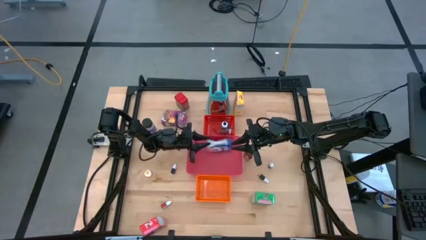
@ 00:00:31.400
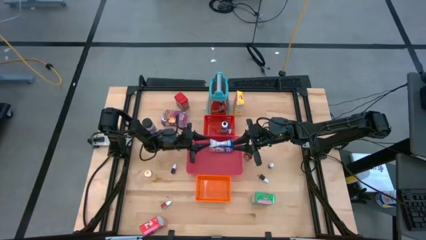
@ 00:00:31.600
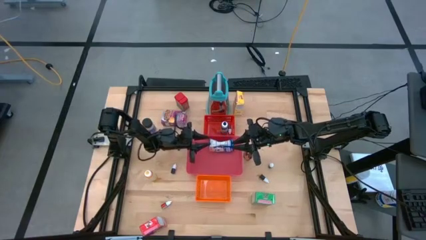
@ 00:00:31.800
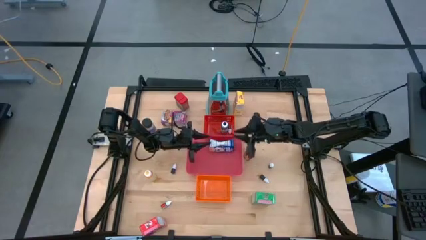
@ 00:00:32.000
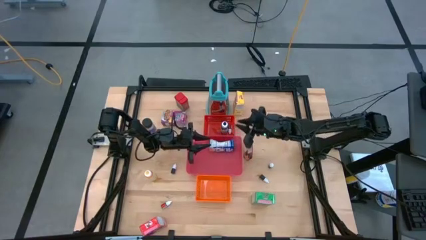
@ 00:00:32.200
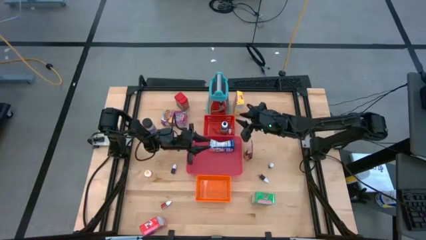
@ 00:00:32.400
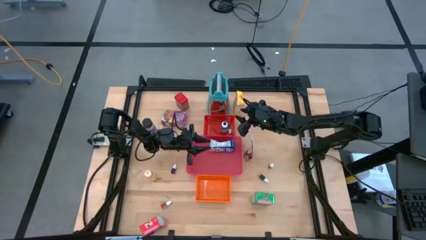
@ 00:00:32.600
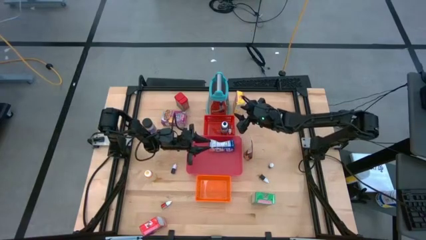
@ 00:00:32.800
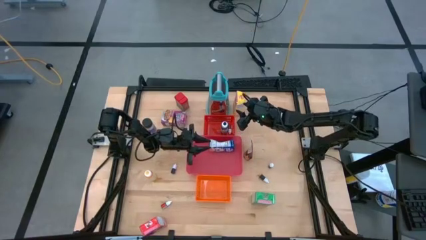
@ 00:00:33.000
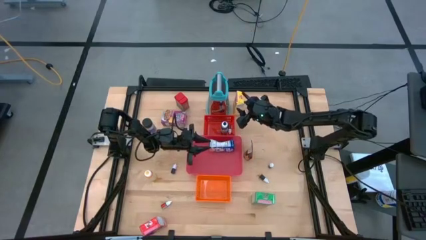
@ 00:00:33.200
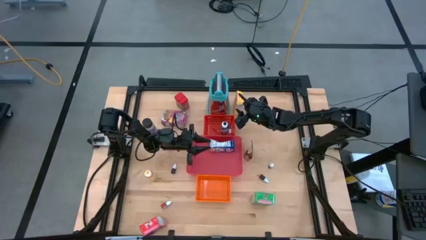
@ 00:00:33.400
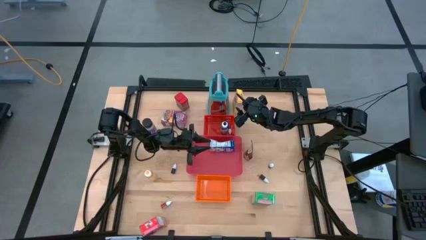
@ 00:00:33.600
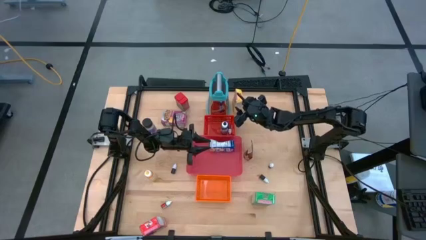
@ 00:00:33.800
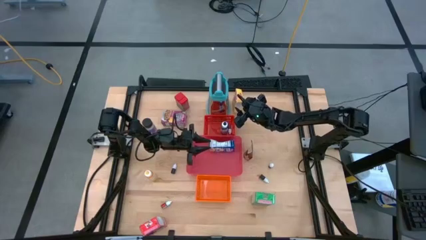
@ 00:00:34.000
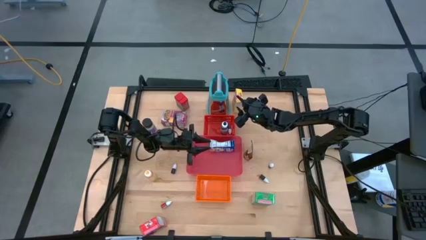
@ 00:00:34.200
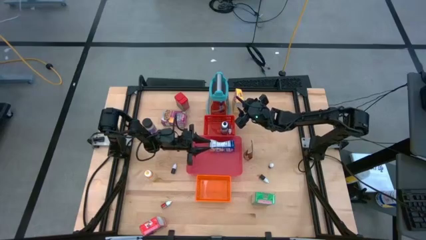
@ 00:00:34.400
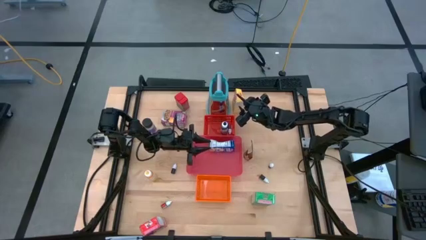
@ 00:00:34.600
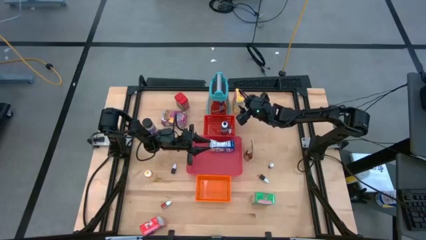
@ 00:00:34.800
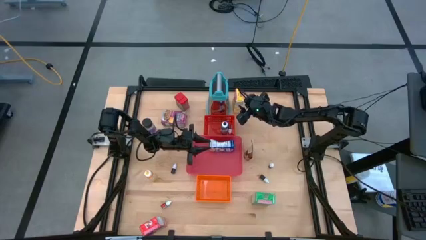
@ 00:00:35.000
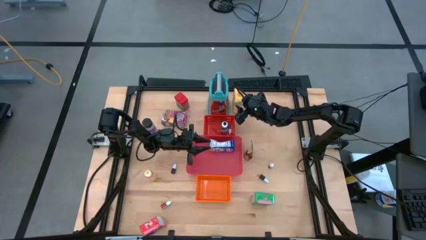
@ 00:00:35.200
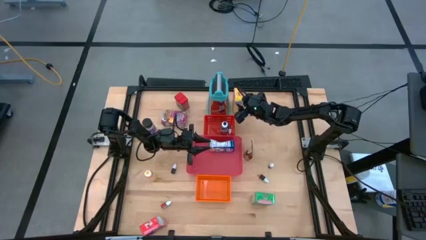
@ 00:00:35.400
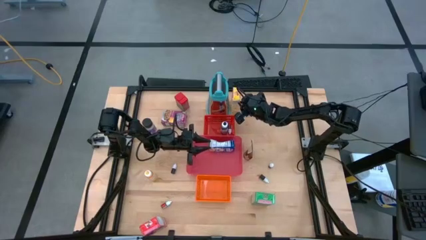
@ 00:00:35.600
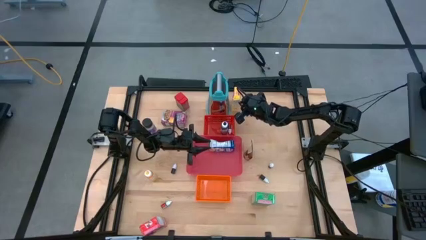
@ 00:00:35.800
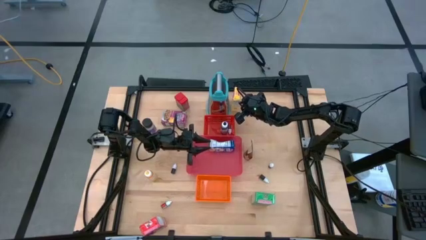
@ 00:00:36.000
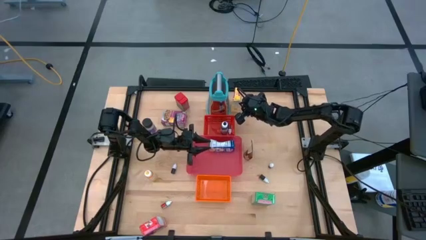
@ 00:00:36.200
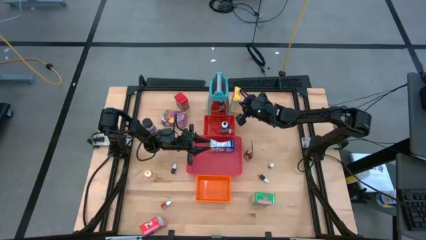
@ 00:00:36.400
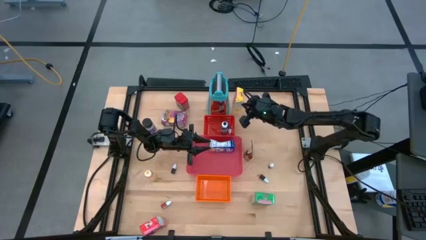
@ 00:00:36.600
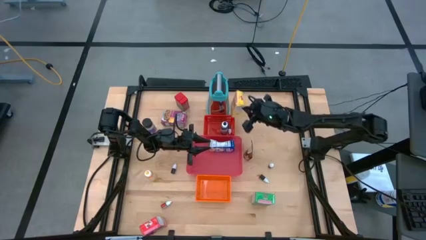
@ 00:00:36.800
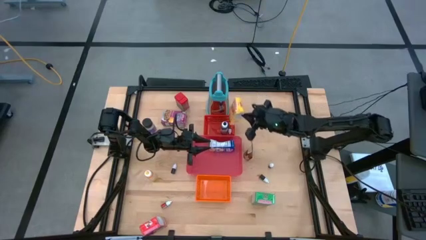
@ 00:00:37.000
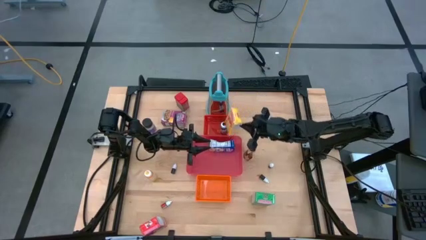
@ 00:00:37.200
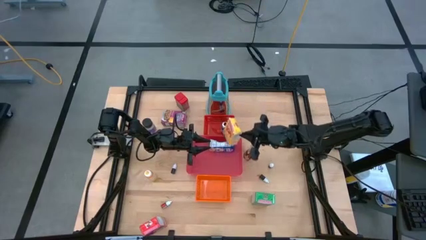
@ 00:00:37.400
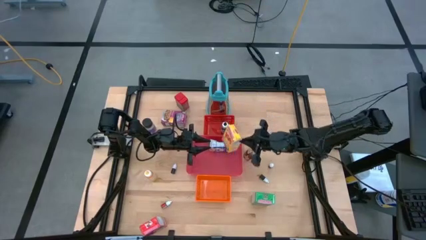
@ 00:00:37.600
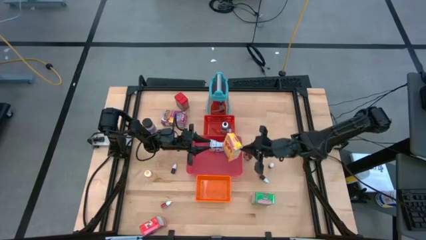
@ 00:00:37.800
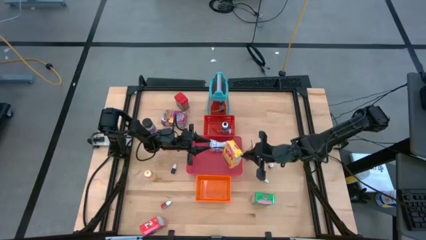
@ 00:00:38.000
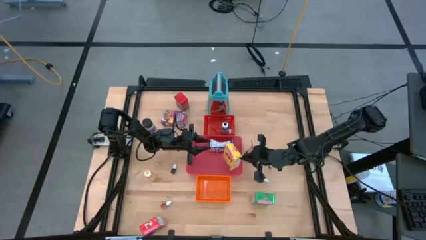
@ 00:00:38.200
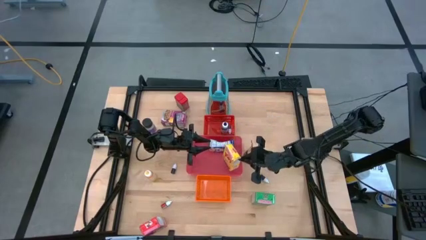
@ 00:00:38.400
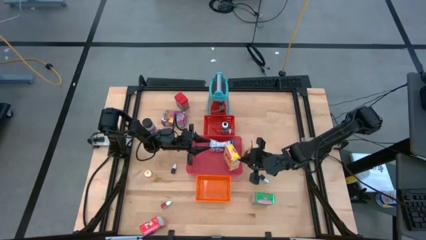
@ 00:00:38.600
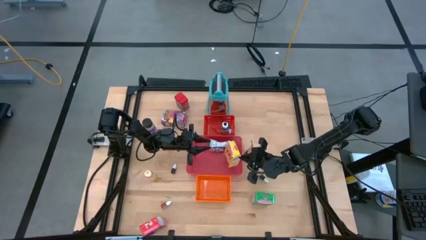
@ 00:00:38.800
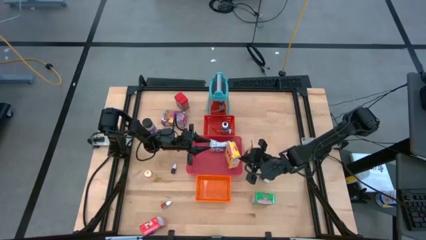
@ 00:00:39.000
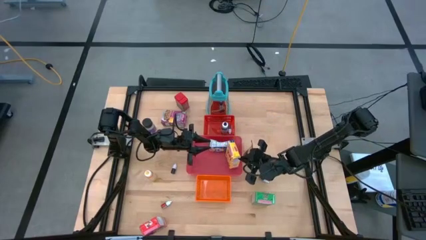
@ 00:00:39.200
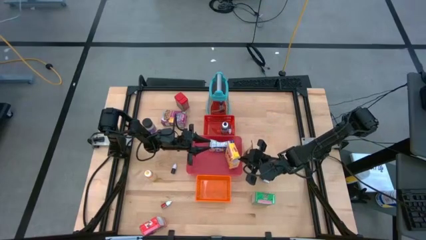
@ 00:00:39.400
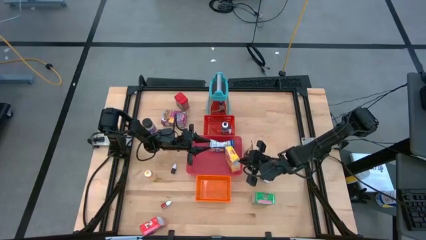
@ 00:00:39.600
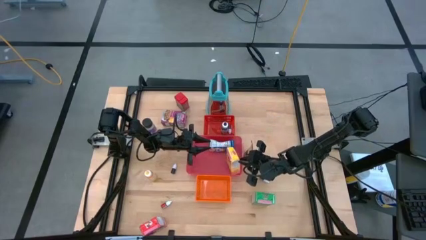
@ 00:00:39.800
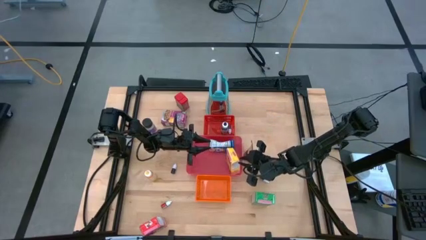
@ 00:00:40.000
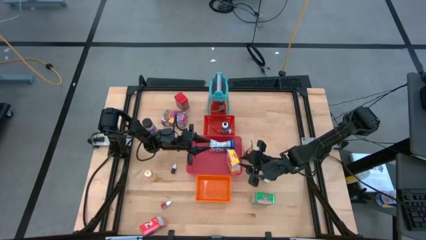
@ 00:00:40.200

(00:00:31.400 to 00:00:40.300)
Task: Pick & Place Kitchen Items
Put the yellow cereal box into the pink bin

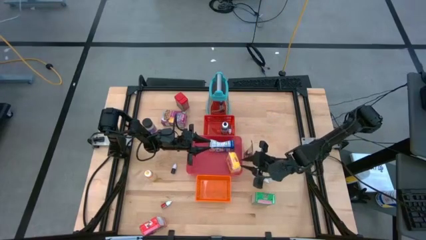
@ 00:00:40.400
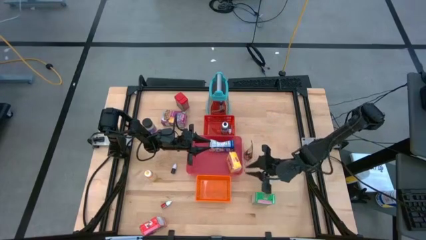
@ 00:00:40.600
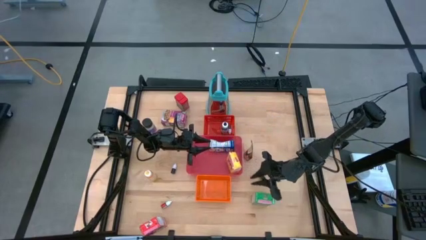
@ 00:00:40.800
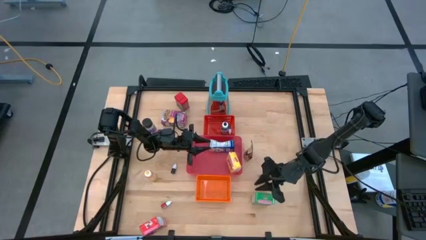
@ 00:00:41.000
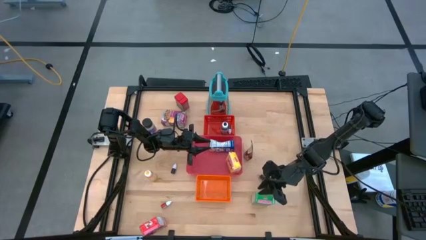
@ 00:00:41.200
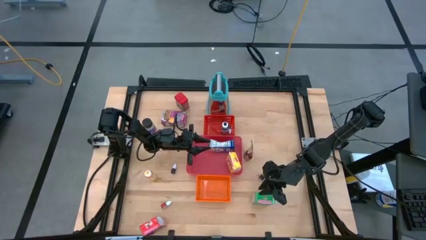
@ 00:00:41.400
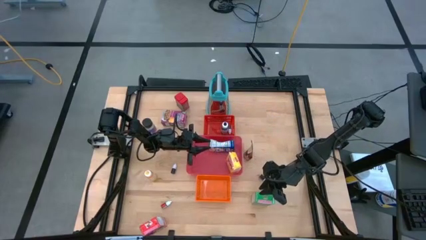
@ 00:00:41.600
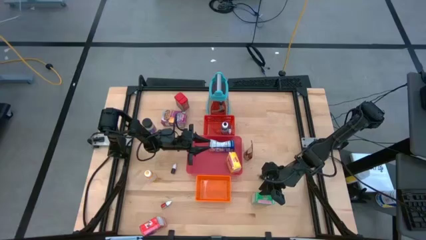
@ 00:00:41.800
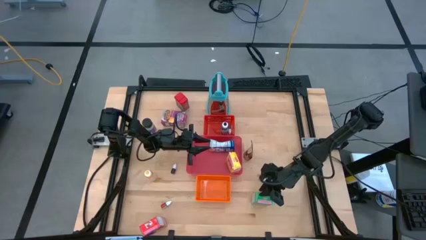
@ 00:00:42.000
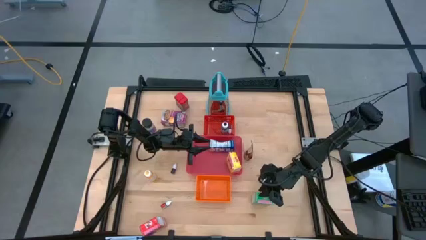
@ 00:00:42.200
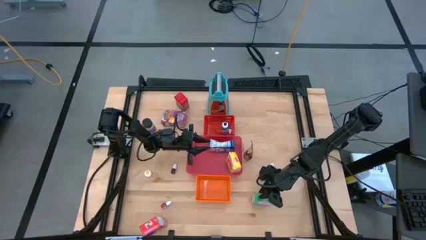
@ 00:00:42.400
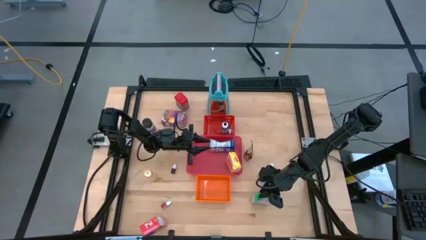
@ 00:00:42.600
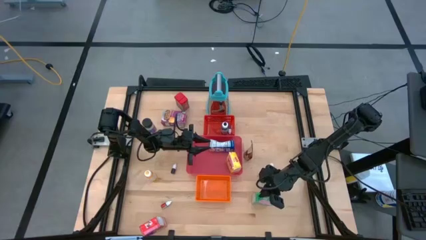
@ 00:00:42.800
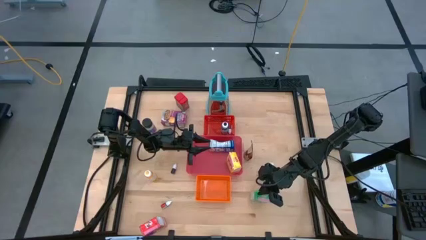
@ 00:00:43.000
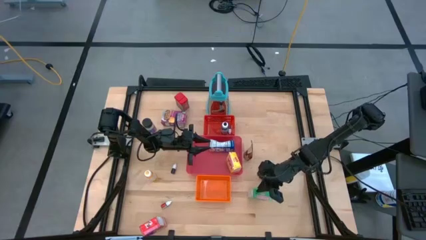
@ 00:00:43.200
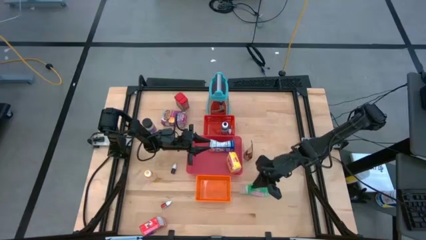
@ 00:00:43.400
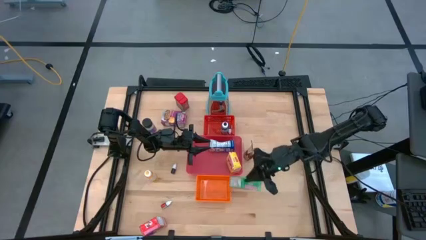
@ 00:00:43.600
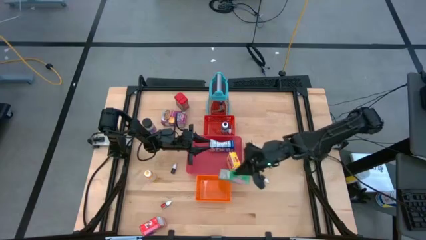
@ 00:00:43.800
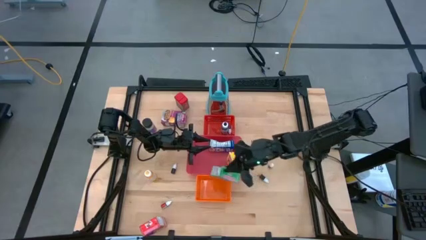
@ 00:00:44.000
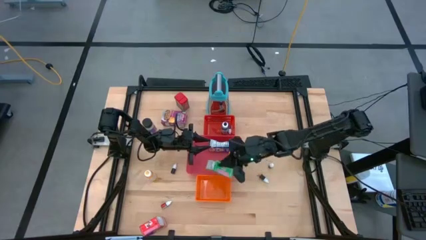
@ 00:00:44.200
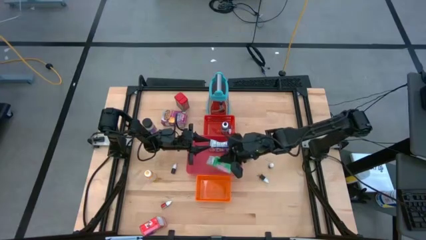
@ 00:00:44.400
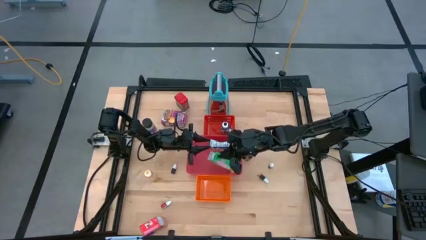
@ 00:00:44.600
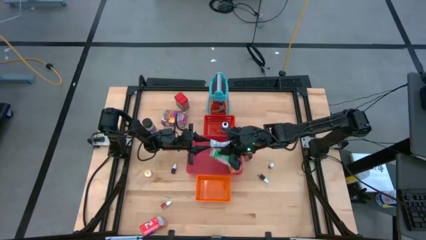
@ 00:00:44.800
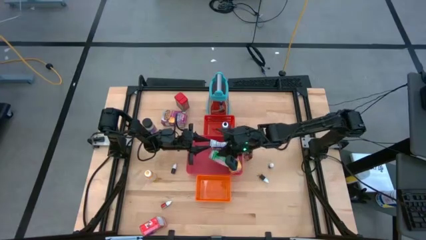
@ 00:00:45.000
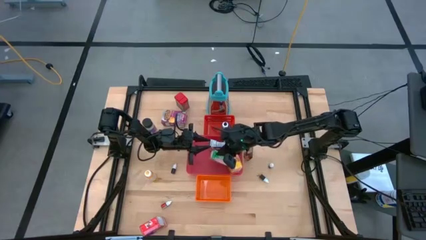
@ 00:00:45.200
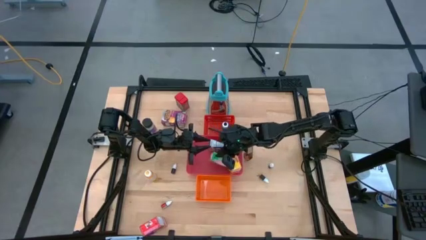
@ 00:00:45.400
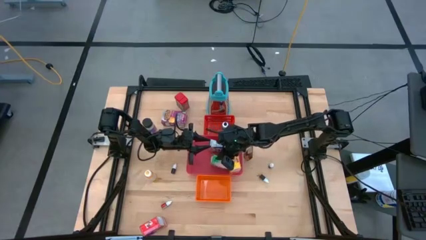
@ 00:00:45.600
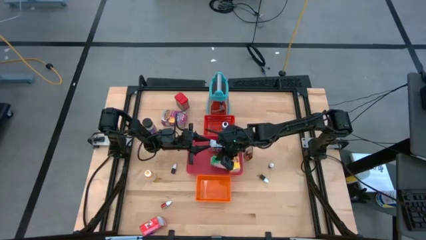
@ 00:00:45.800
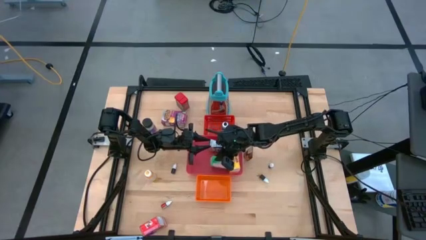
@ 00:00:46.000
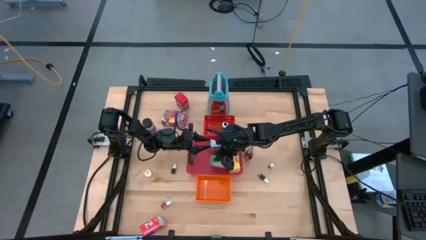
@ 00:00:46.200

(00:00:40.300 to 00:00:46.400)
Put the green cereal box into the pink bin
